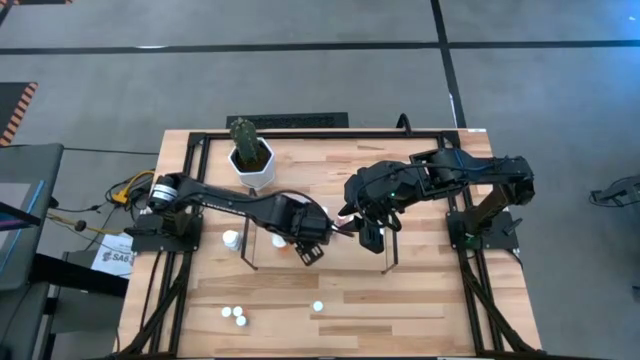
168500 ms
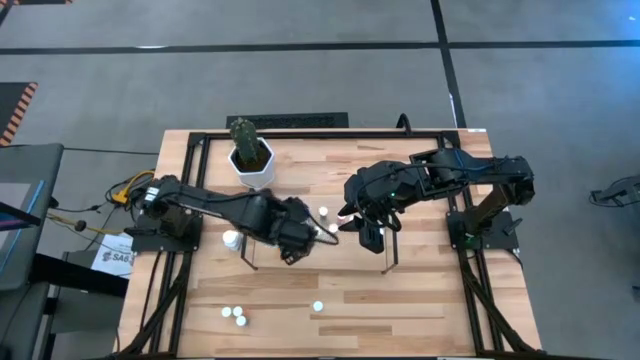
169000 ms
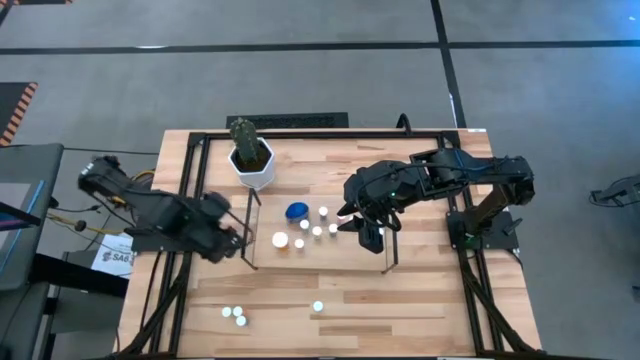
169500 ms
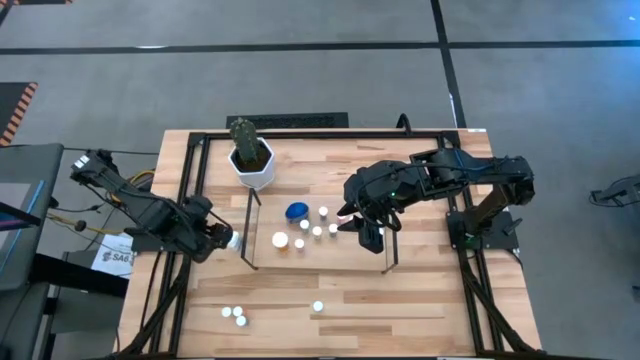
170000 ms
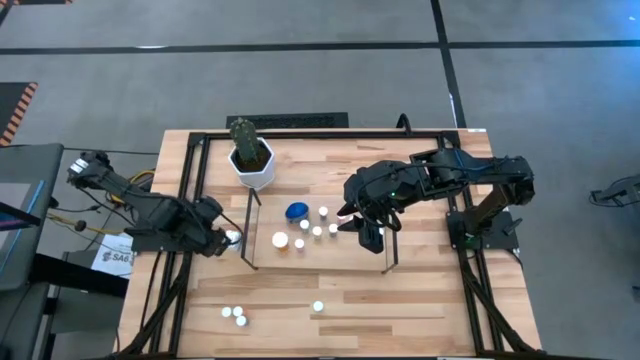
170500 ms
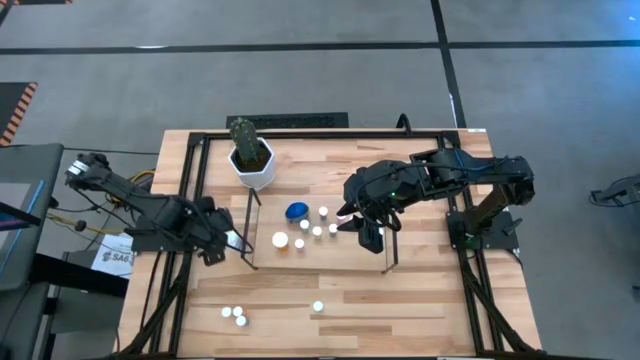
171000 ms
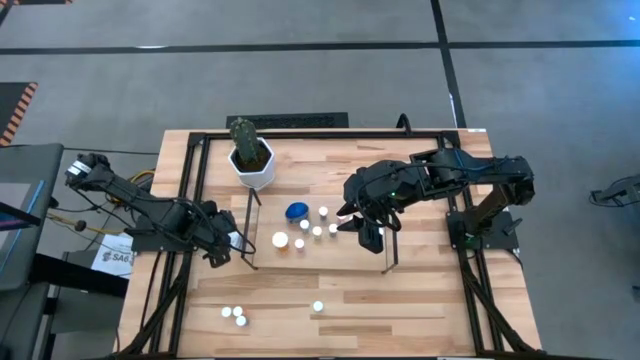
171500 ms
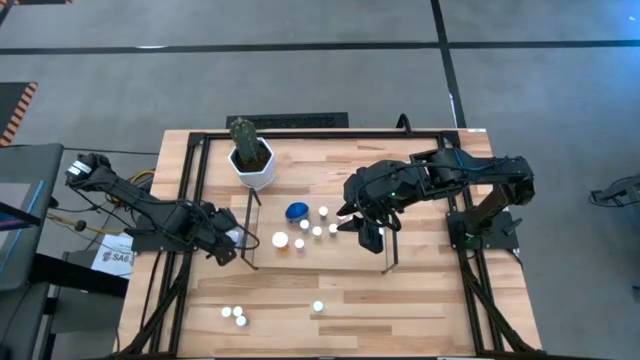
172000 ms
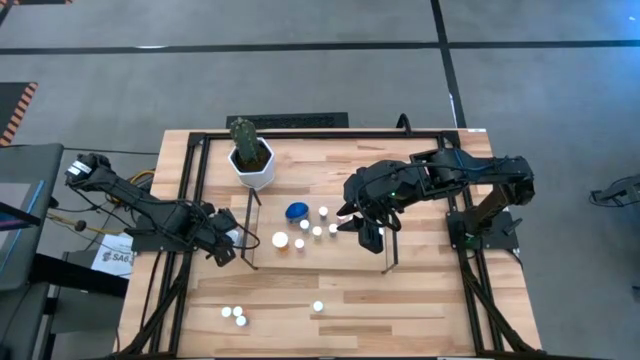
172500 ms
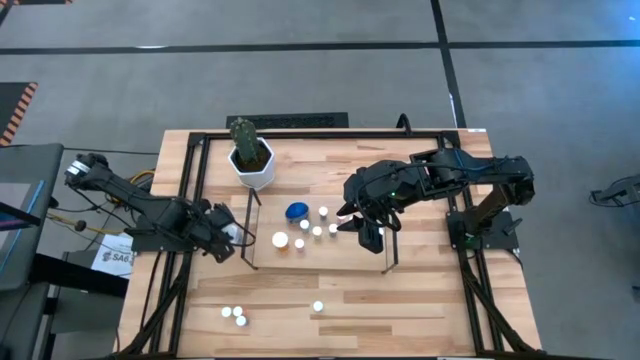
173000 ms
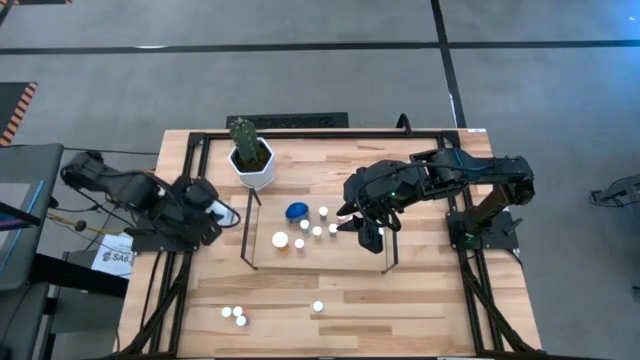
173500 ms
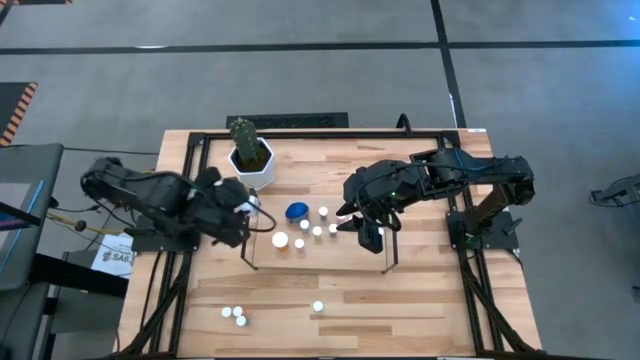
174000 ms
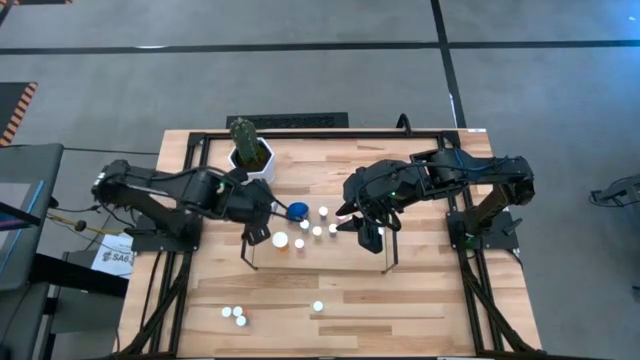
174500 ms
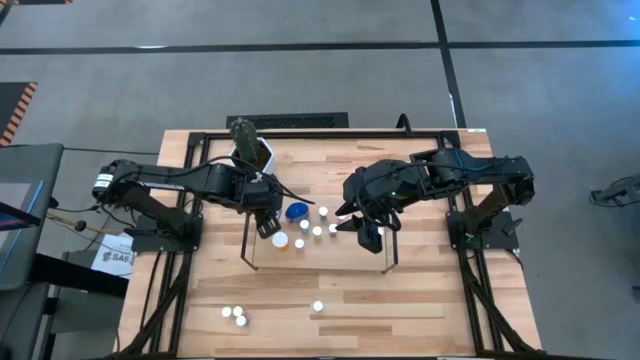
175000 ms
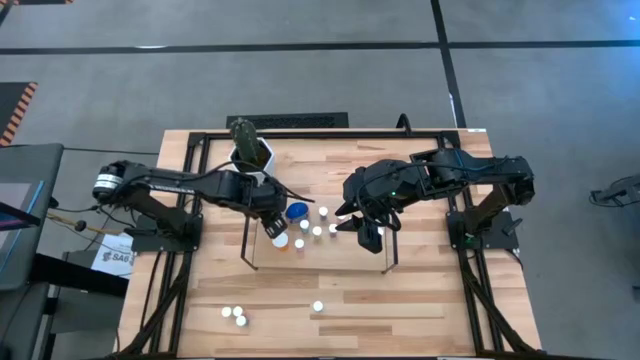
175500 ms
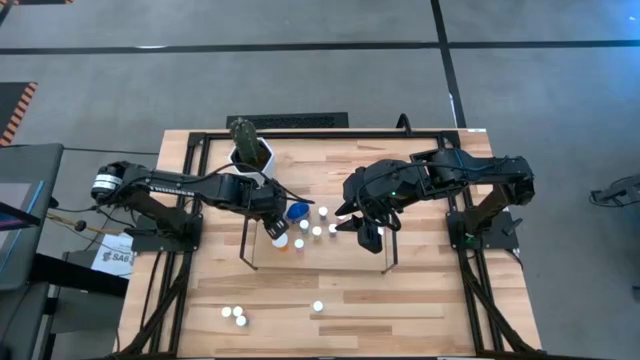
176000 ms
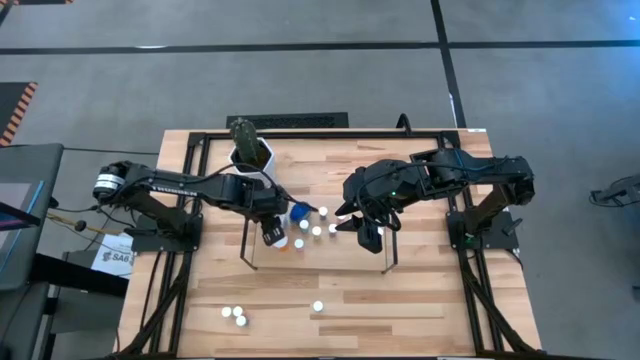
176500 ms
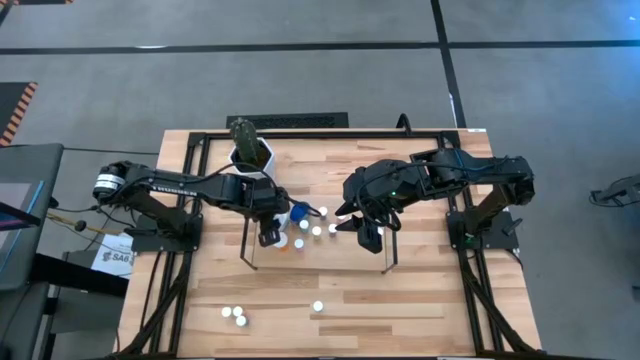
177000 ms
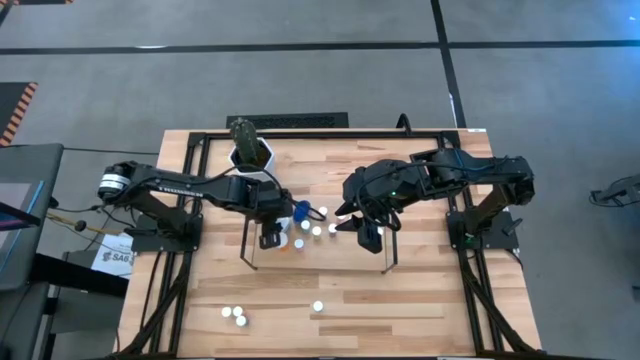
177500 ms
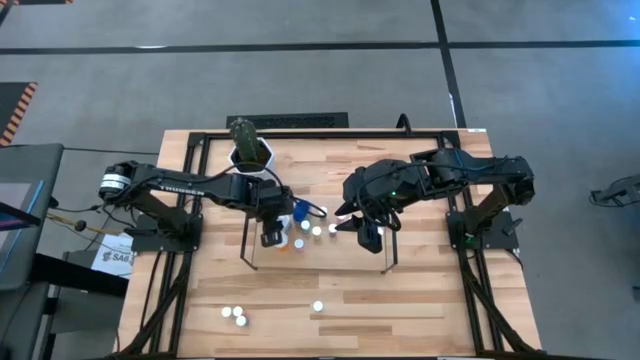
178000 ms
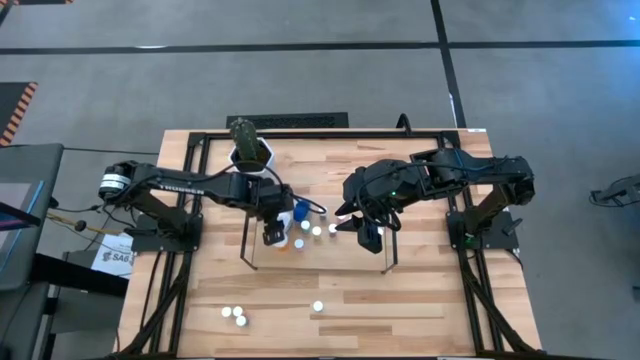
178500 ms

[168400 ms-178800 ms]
Task: Pick and place medicine bottles onto shelf by color
Put the white pill bottle on the shelf

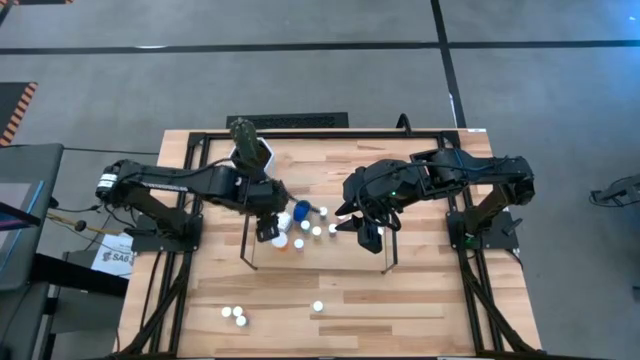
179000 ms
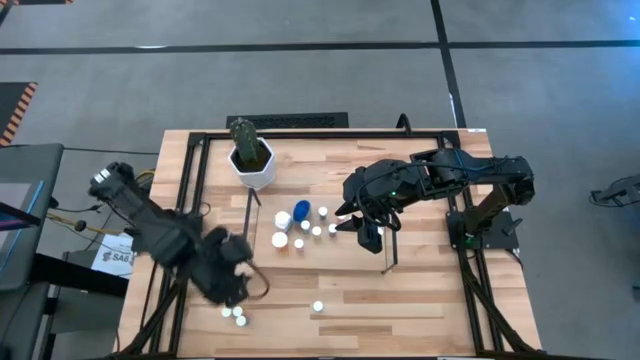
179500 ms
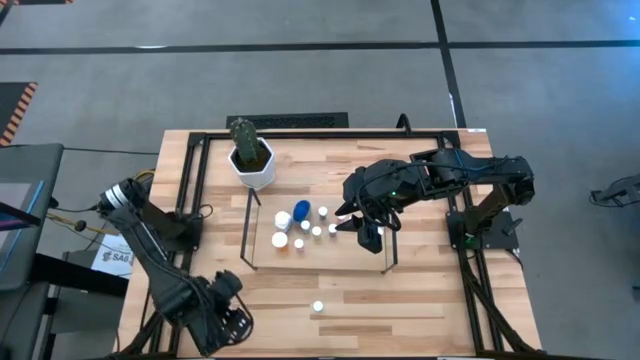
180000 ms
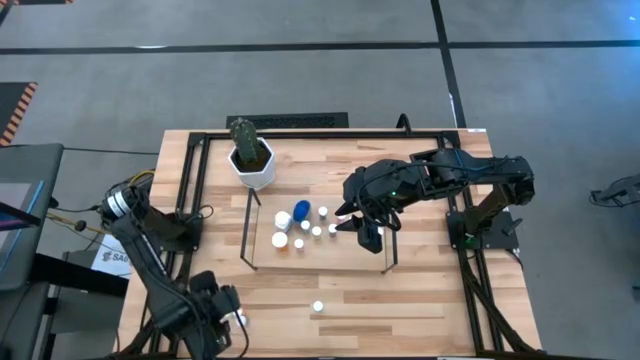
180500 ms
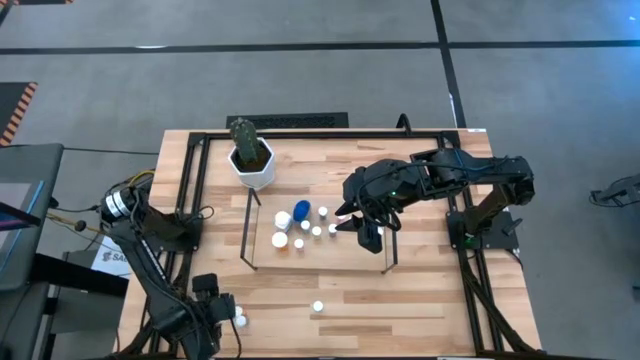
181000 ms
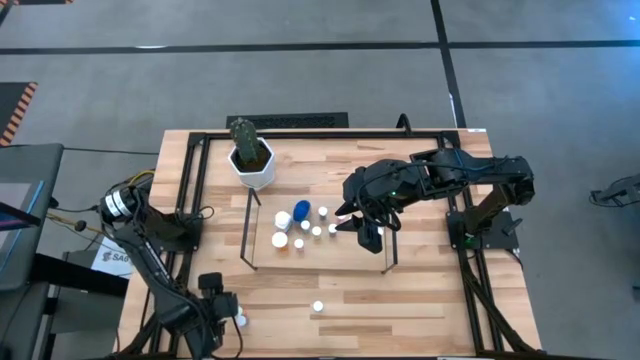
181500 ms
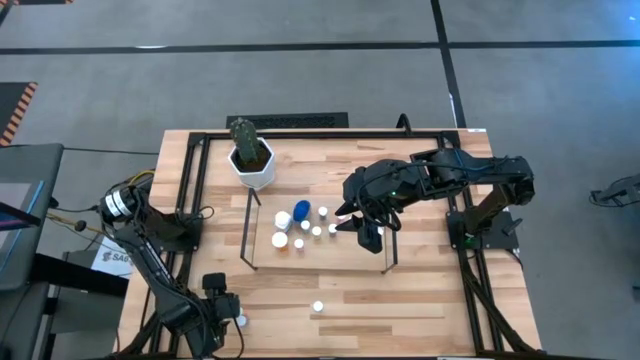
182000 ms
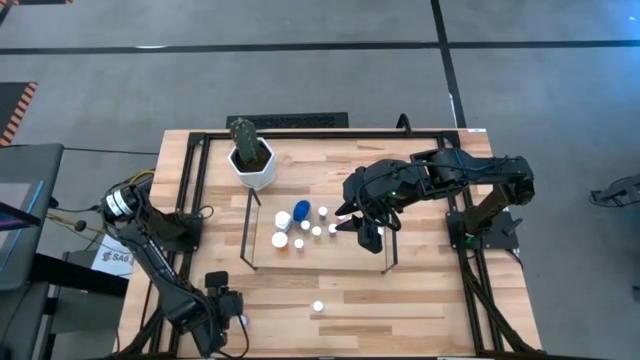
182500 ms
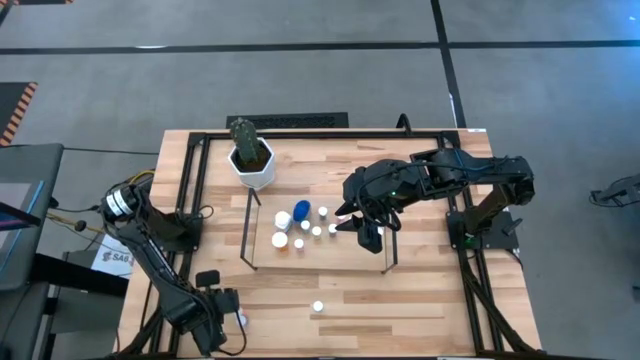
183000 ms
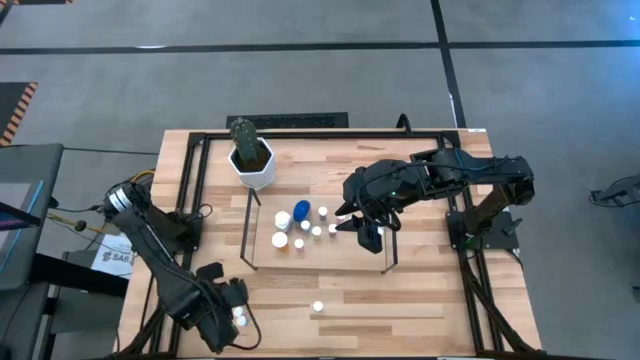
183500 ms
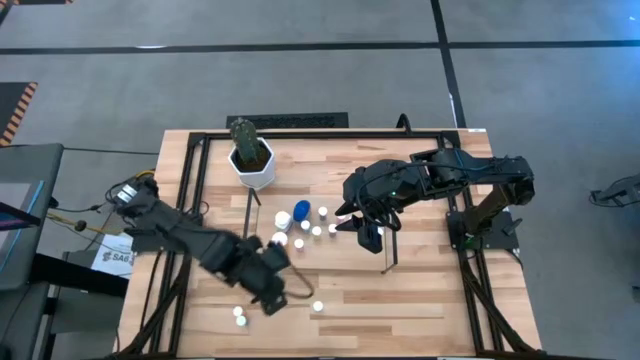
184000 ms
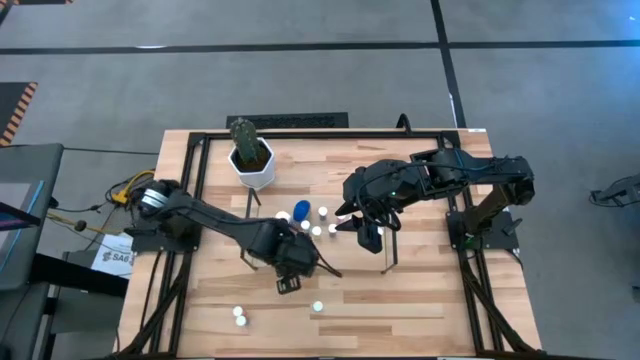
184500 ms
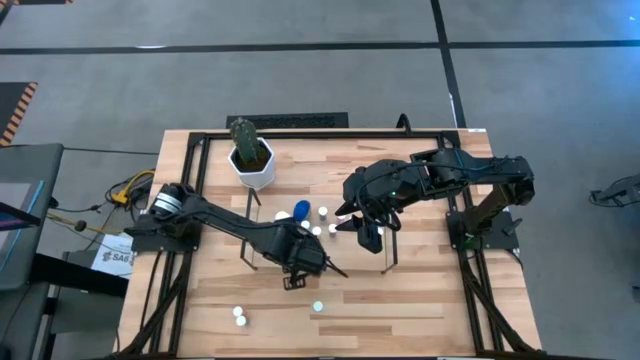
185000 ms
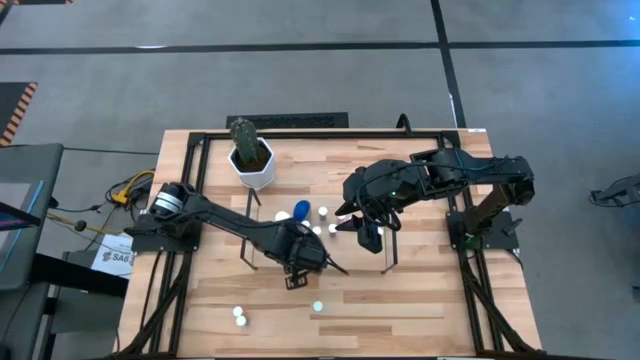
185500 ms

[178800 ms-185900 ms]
Put the orange pill bottle on the shelf

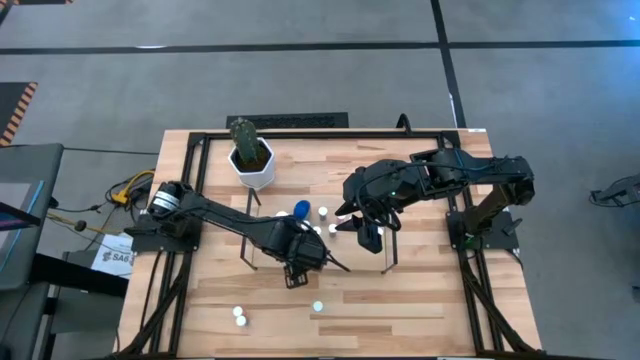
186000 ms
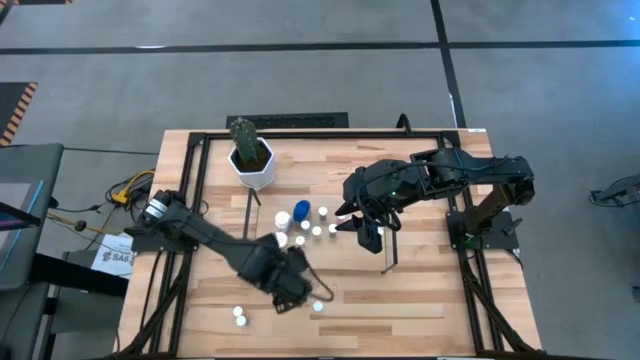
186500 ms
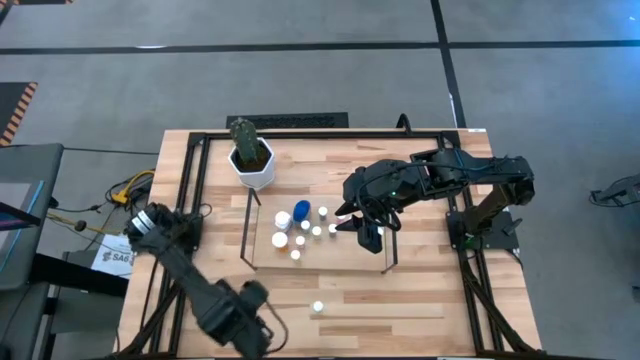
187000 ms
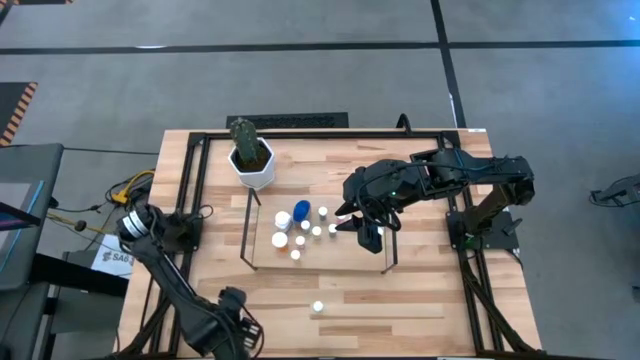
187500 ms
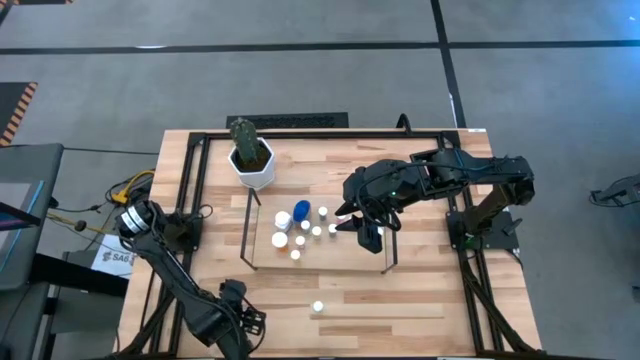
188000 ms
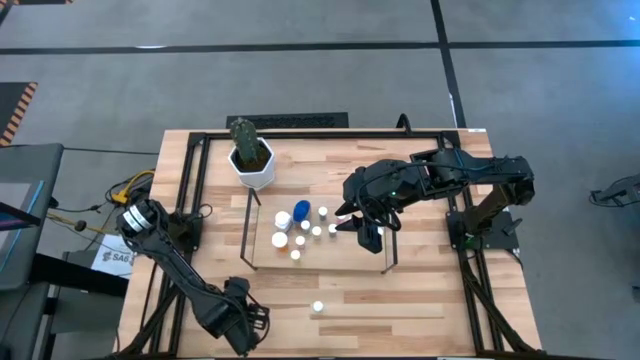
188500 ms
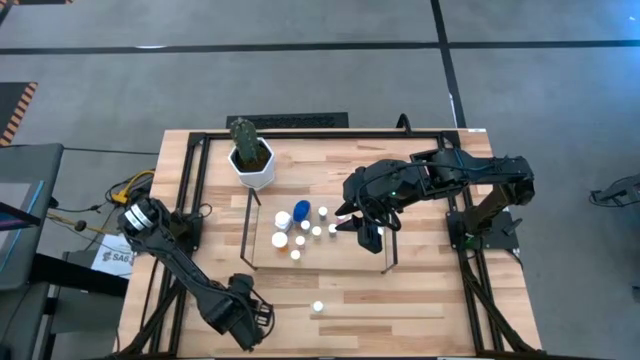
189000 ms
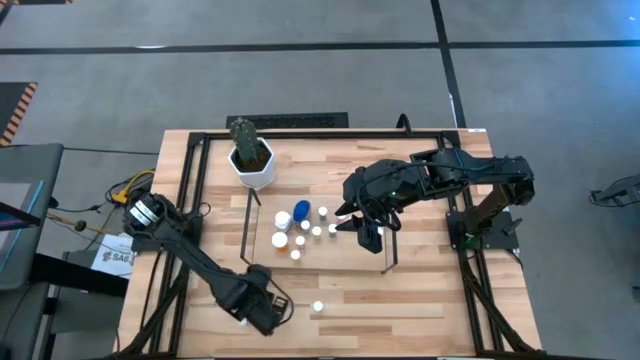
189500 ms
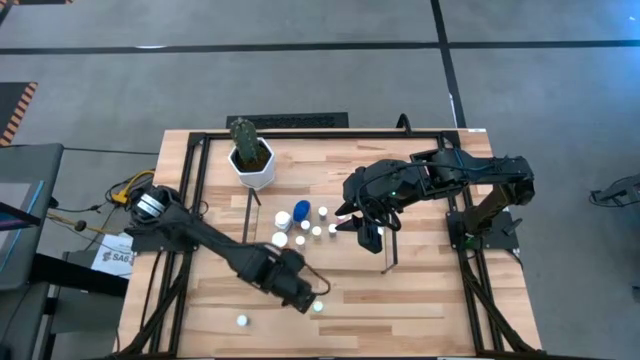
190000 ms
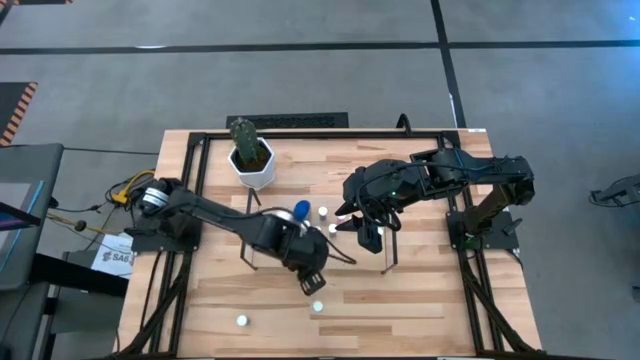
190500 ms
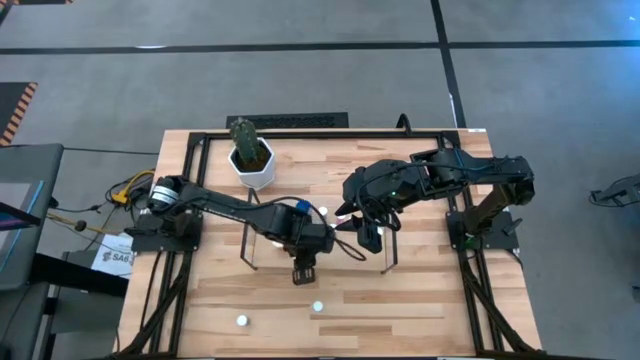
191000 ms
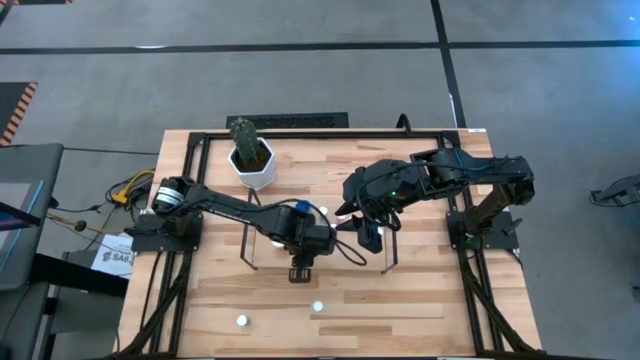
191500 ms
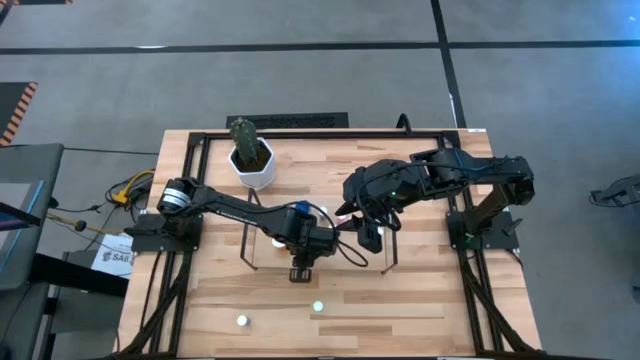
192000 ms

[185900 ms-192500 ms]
Put the pink pill bottle on the shelf
